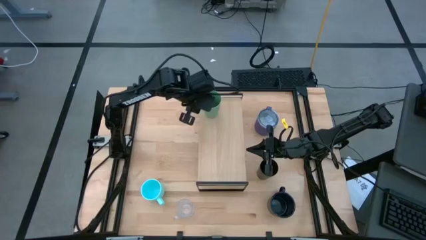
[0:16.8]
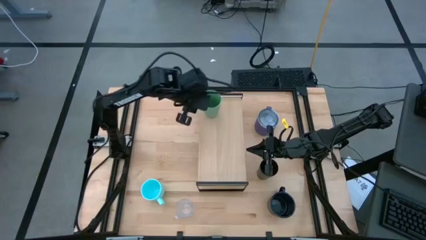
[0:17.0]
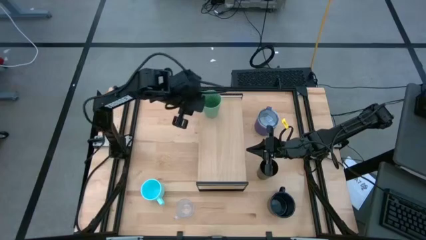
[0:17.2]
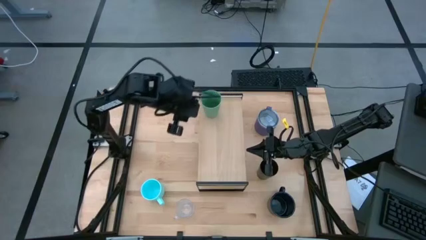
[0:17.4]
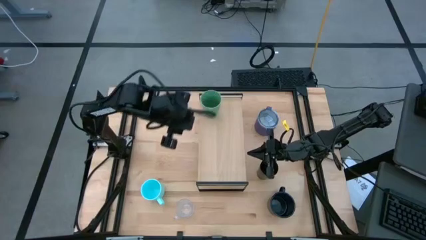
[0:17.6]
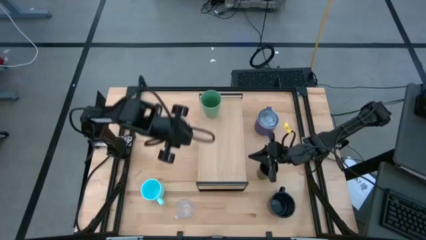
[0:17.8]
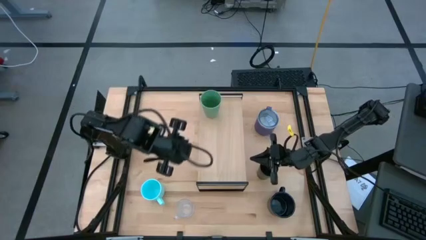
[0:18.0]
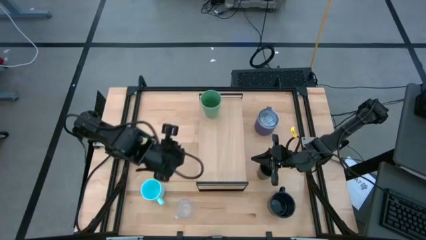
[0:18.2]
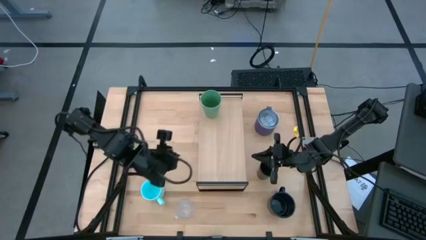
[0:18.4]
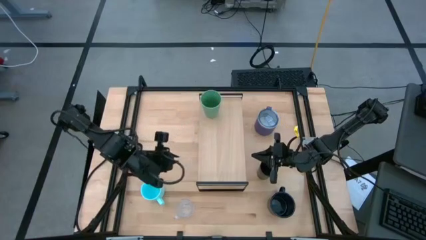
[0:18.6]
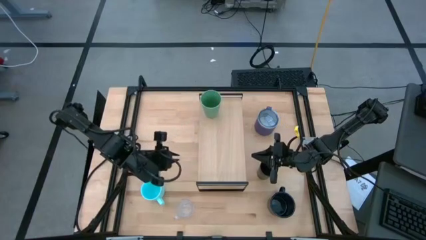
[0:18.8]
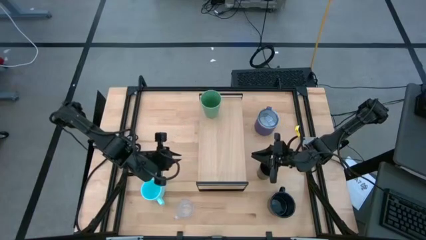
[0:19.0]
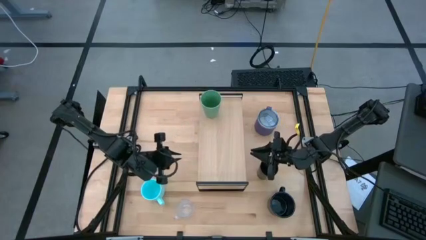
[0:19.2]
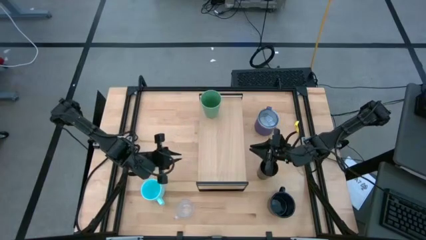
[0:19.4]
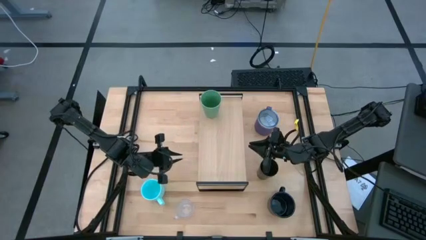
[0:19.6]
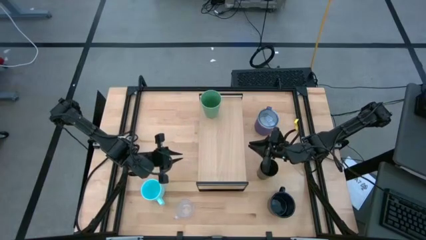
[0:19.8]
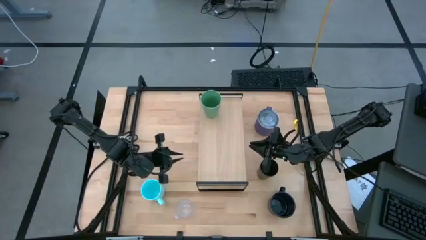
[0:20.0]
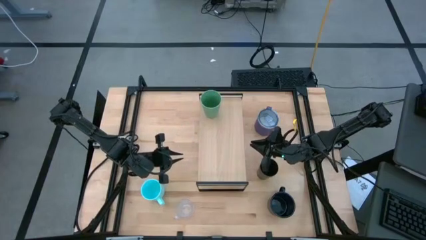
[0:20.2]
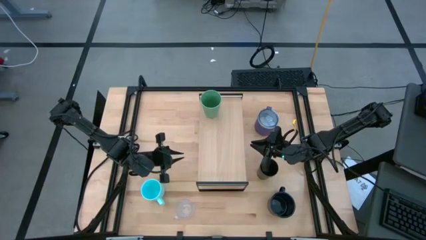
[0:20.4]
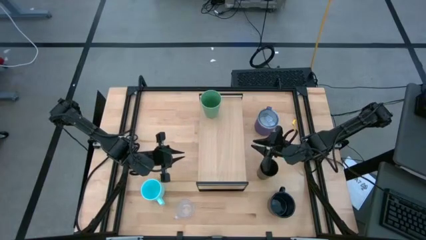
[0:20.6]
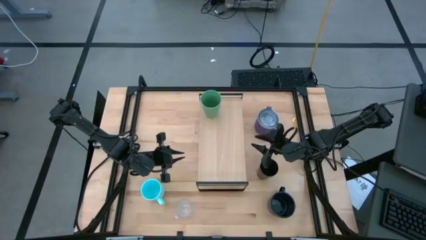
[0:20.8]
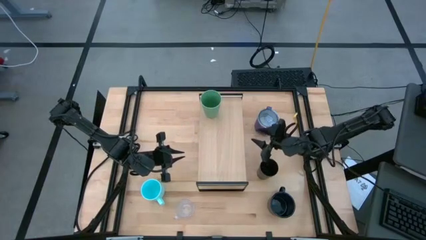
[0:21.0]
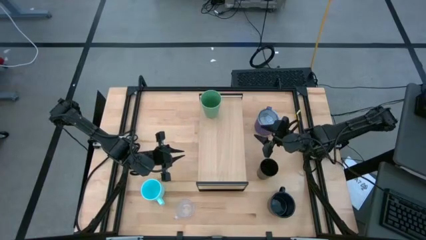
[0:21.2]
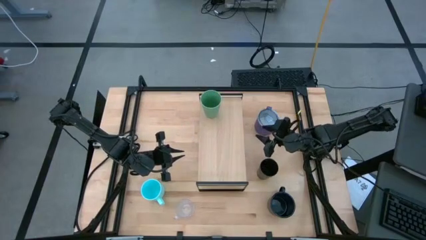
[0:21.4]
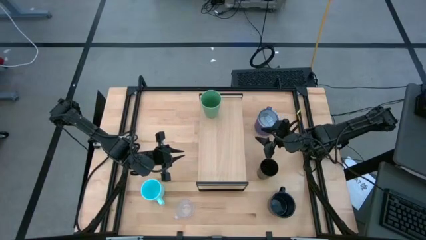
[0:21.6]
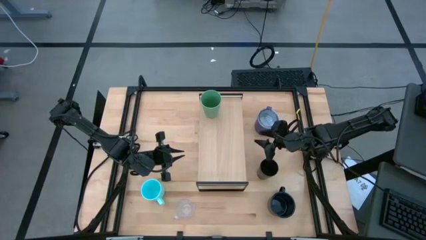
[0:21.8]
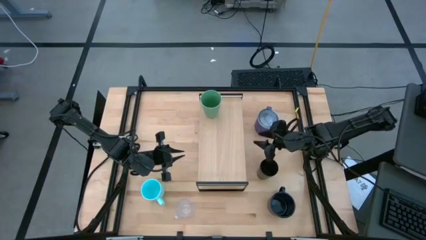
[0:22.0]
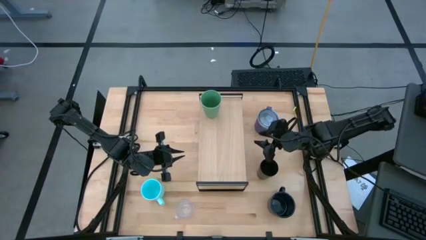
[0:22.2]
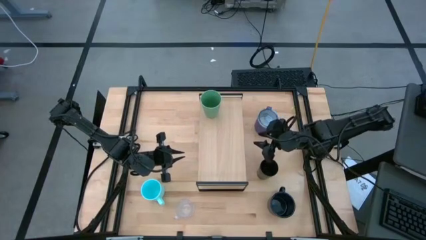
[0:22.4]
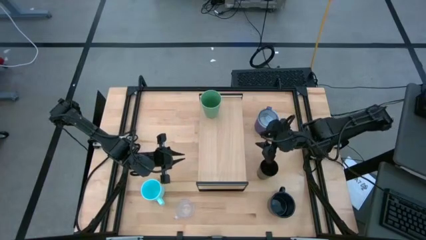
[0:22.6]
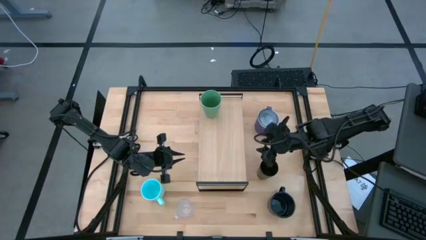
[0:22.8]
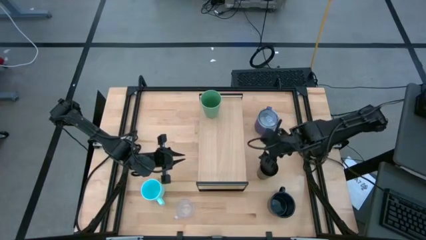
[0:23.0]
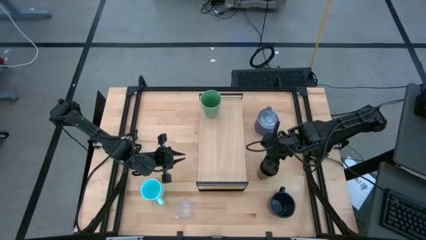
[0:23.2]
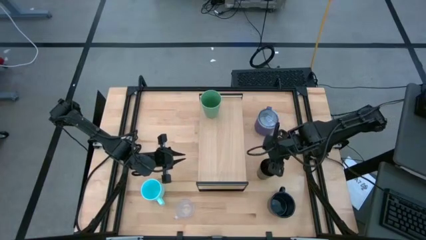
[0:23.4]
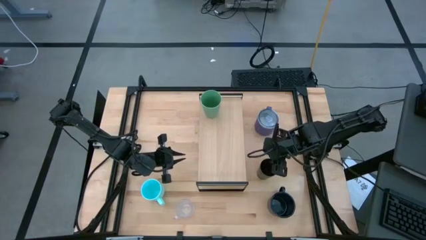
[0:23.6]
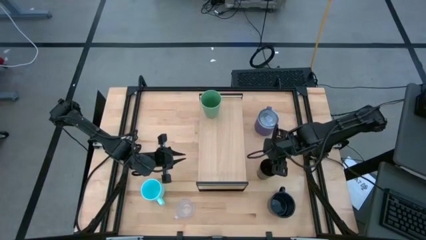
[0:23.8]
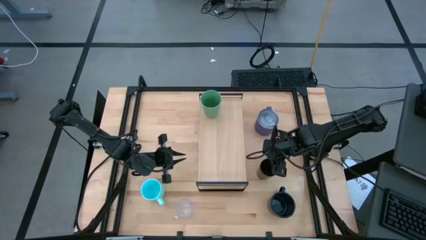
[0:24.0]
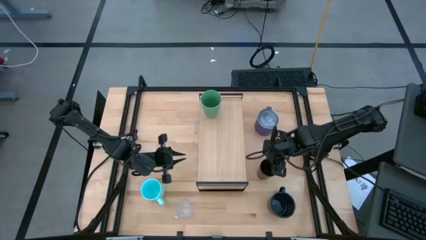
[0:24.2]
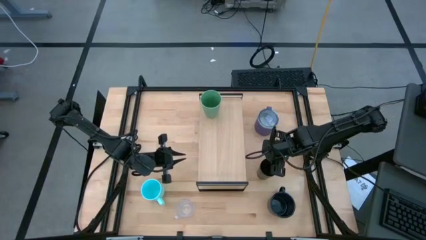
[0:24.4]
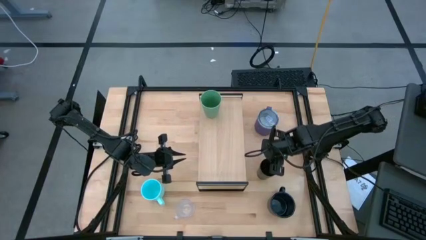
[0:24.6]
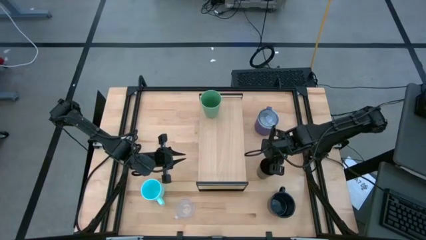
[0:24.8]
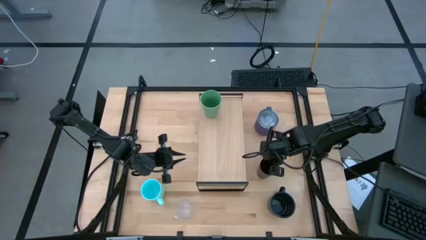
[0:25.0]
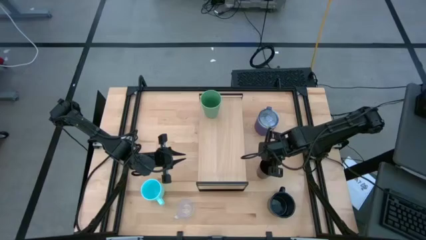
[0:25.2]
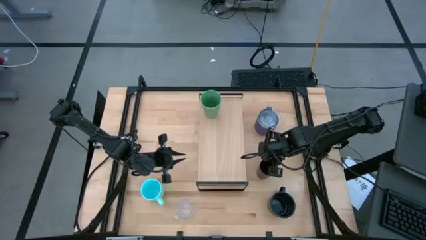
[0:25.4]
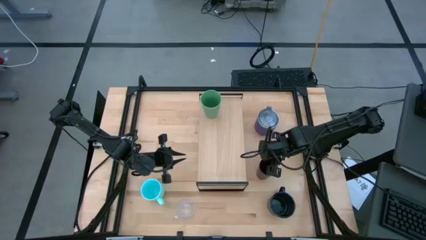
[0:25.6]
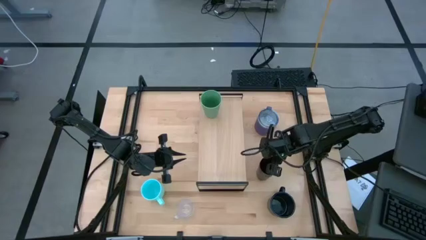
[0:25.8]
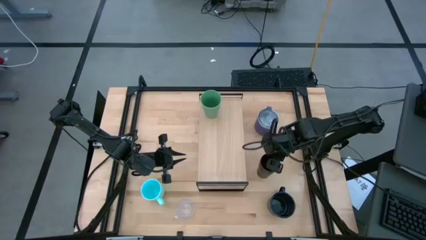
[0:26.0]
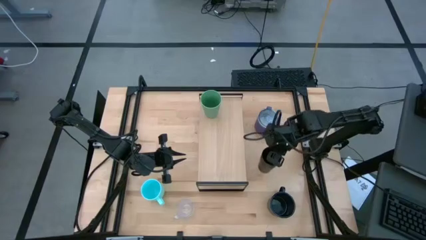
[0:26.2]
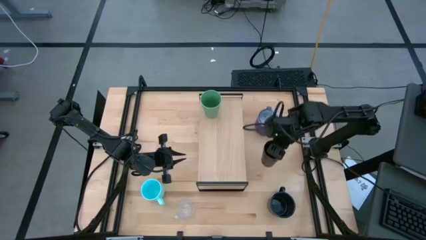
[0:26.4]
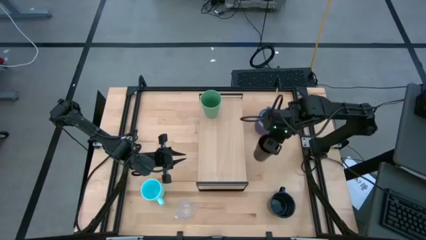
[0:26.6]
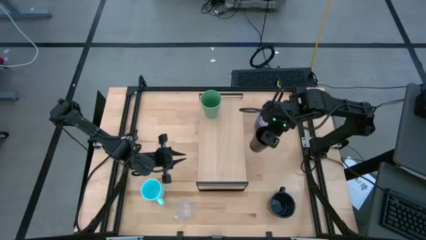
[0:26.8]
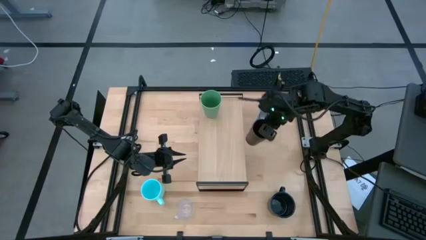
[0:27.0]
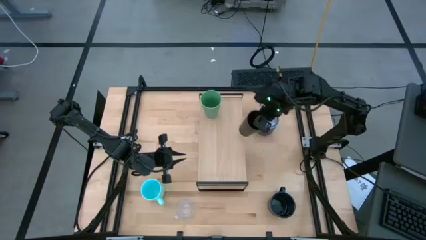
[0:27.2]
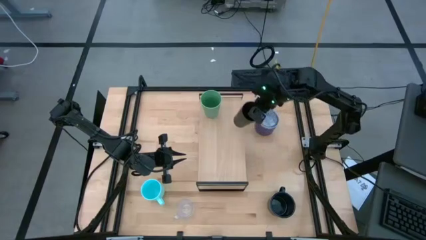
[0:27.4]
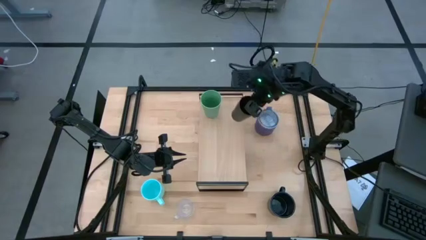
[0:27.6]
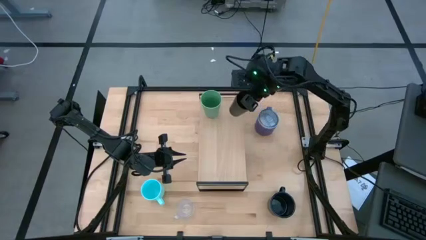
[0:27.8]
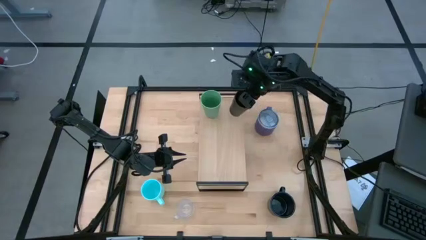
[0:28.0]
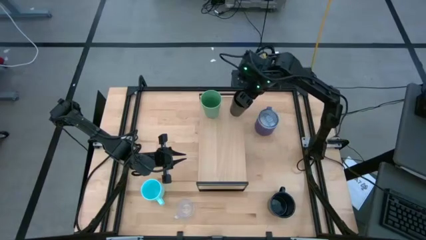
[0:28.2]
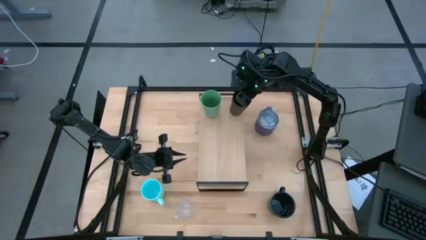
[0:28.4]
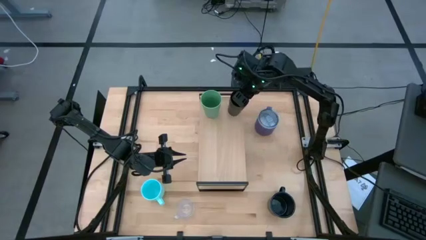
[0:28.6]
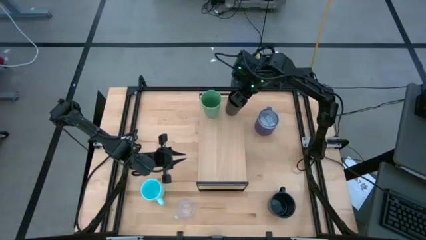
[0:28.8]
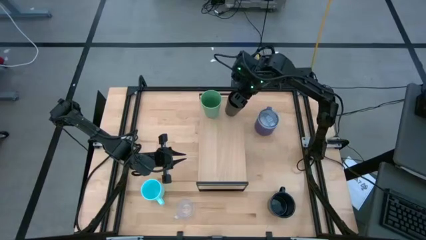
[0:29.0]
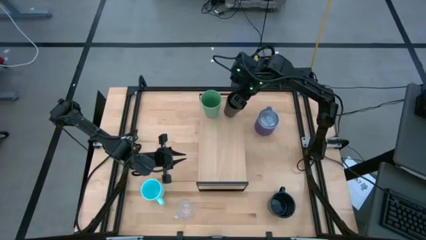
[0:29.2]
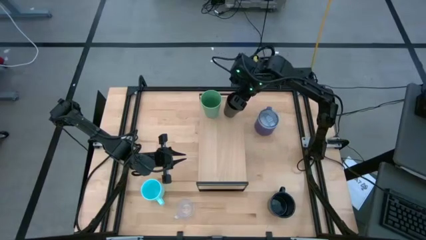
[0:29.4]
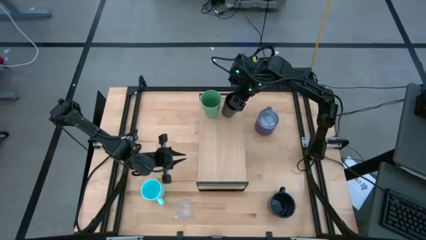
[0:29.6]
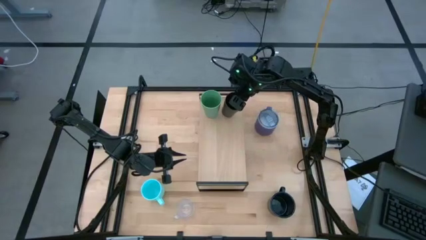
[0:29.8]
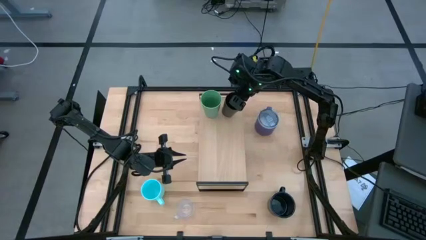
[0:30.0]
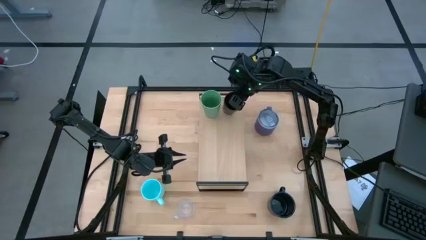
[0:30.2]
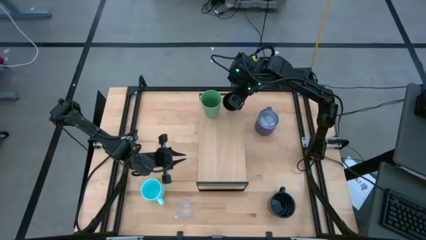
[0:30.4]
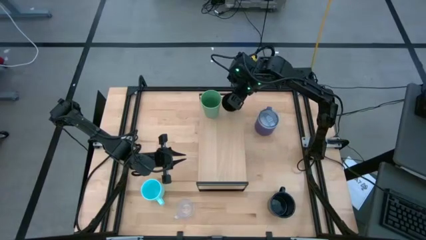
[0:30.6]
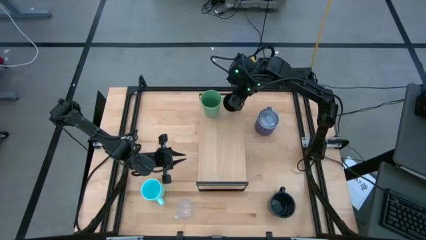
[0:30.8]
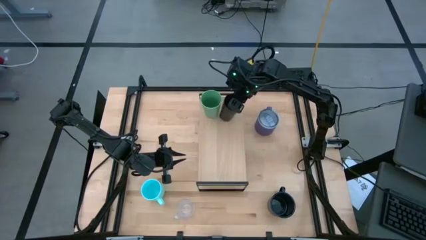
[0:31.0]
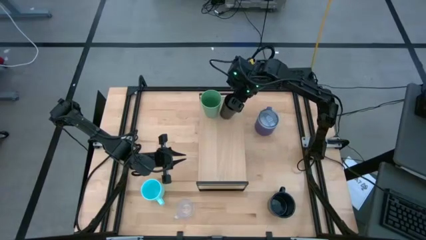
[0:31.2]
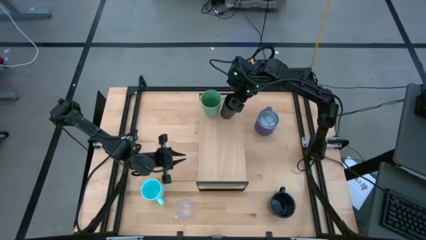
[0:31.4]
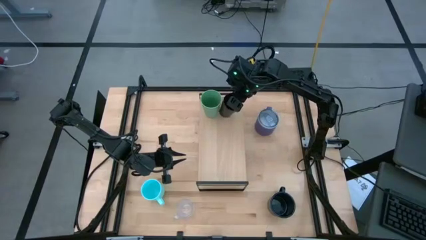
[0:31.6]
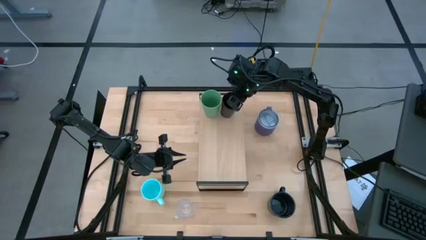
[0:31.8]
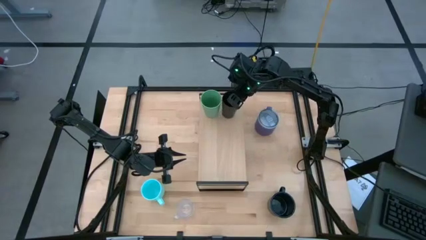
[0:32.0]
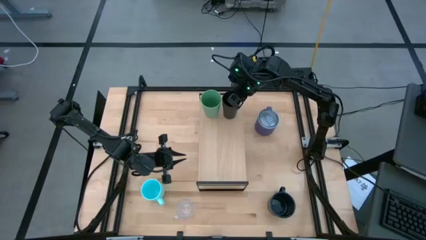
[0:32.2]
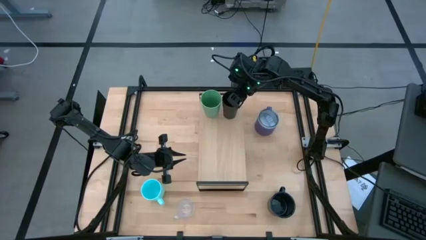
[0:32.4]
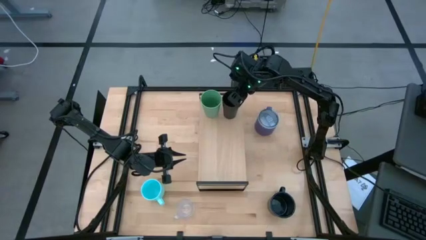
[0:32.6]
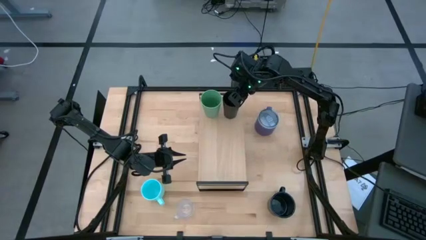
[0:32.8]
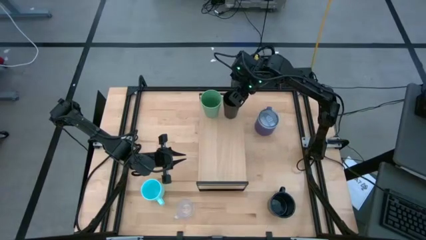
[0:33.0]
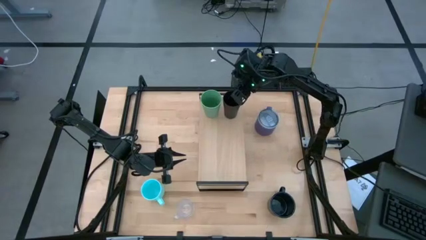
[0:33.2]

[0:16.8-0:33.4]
Task: Stack small to large cups/mugs on shelf
Put the black cup on the shelf
